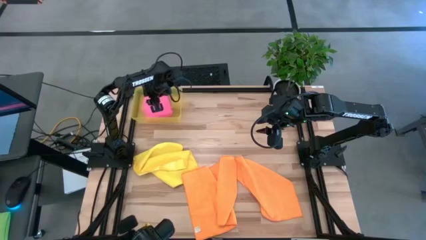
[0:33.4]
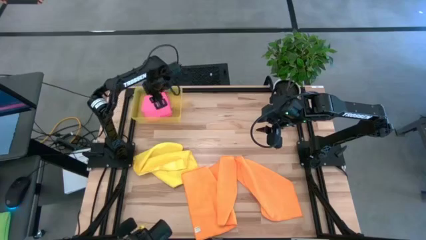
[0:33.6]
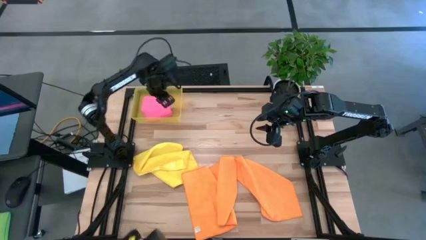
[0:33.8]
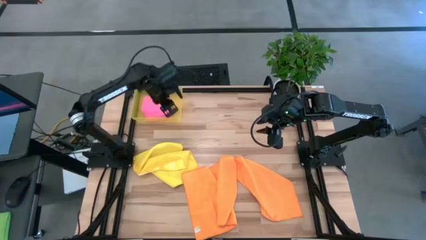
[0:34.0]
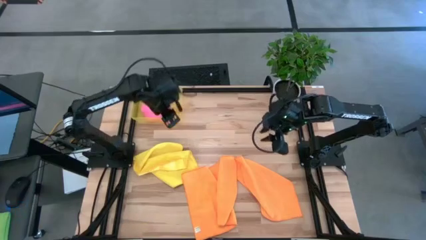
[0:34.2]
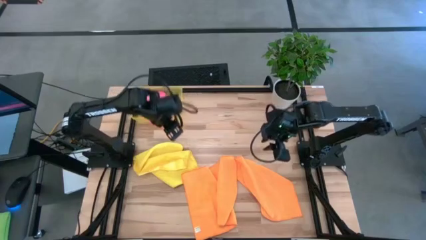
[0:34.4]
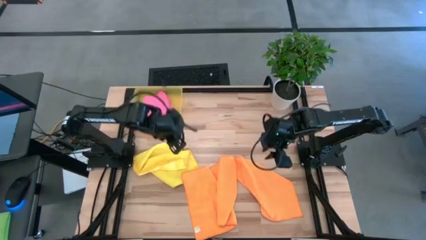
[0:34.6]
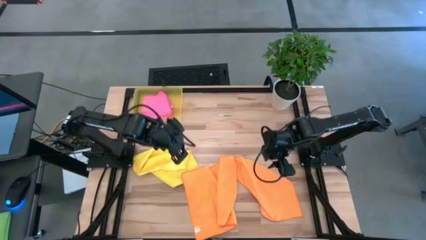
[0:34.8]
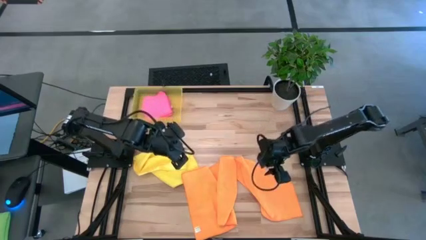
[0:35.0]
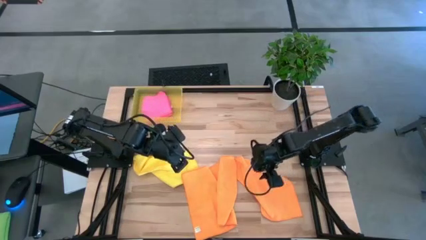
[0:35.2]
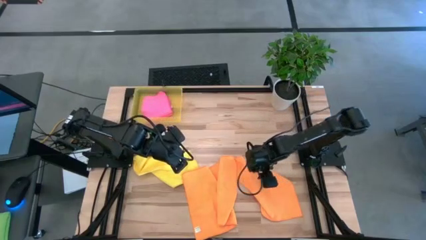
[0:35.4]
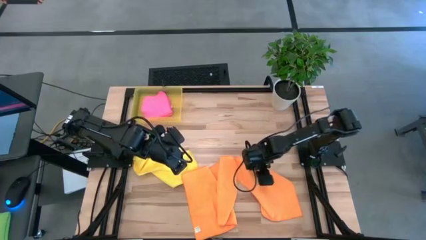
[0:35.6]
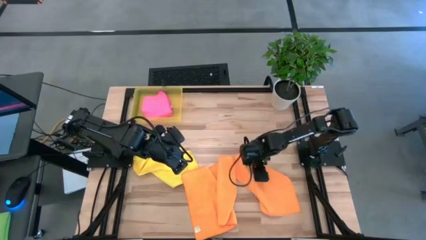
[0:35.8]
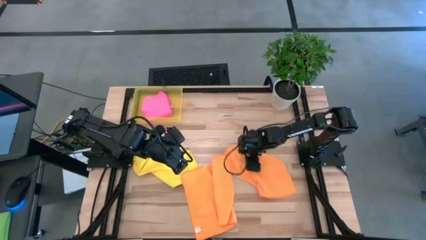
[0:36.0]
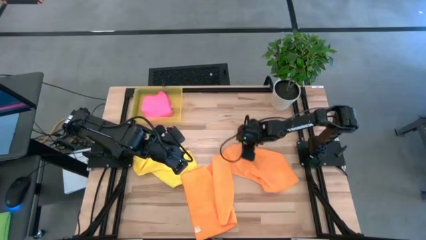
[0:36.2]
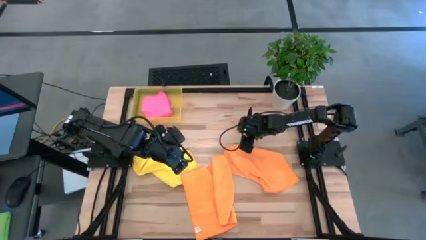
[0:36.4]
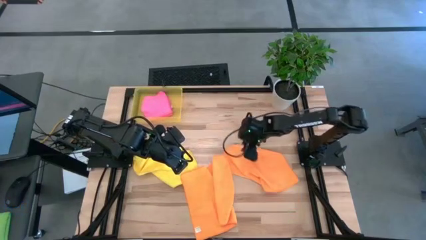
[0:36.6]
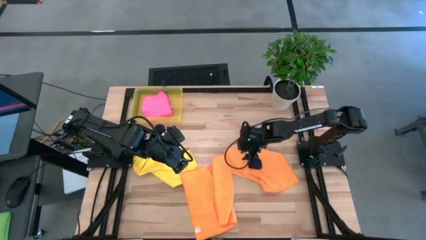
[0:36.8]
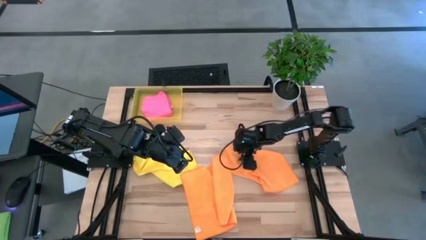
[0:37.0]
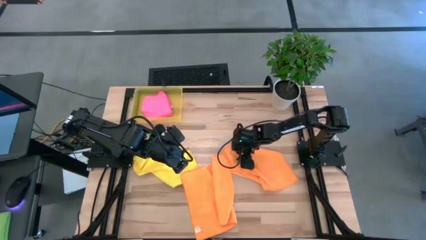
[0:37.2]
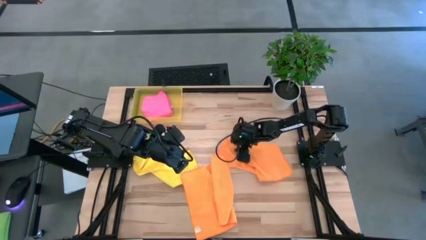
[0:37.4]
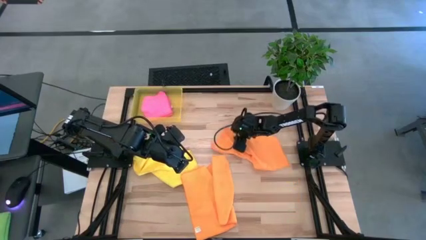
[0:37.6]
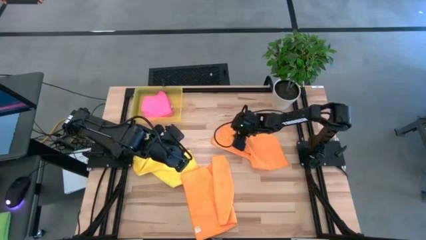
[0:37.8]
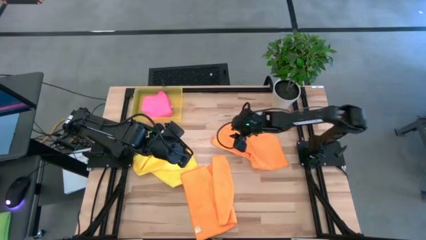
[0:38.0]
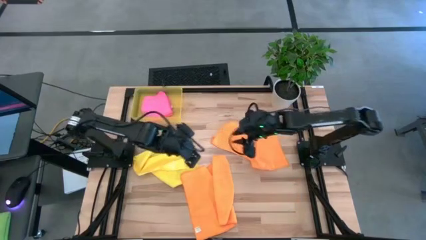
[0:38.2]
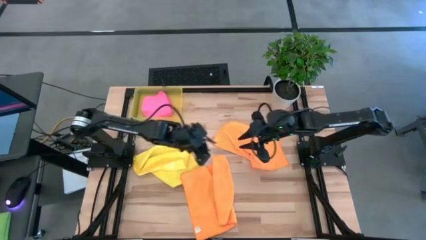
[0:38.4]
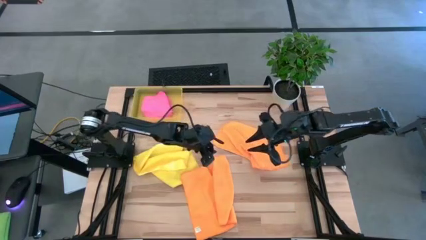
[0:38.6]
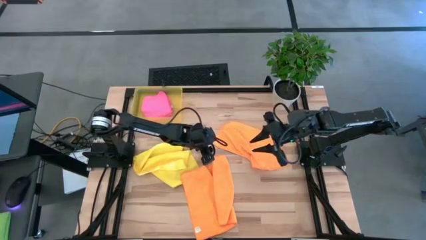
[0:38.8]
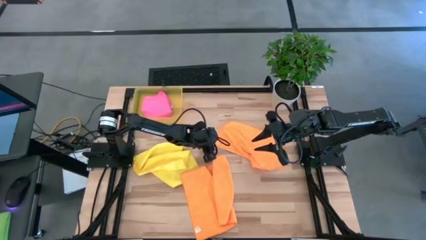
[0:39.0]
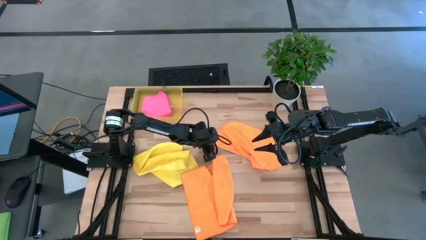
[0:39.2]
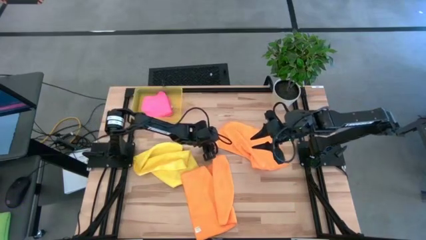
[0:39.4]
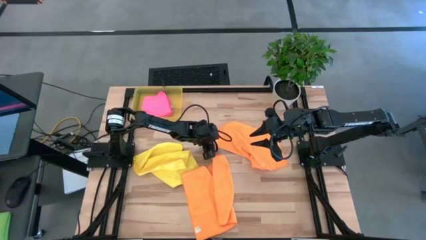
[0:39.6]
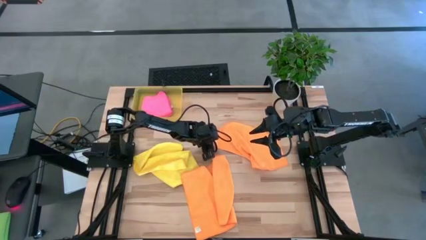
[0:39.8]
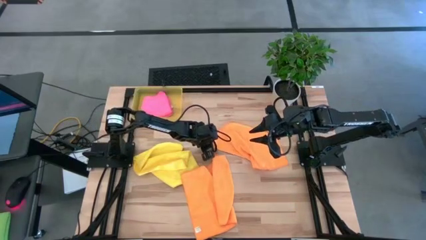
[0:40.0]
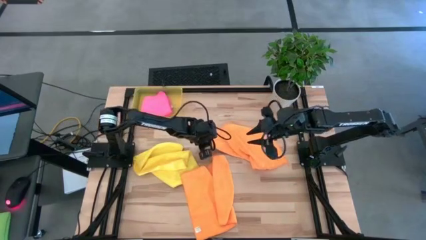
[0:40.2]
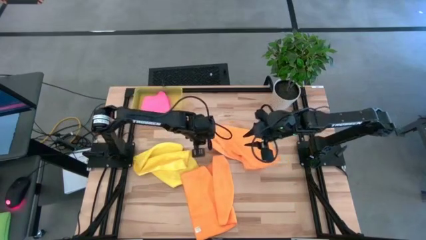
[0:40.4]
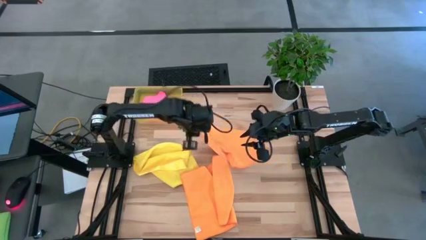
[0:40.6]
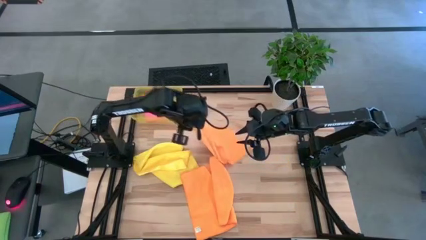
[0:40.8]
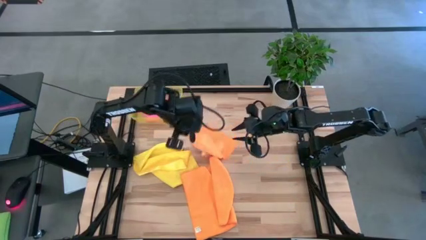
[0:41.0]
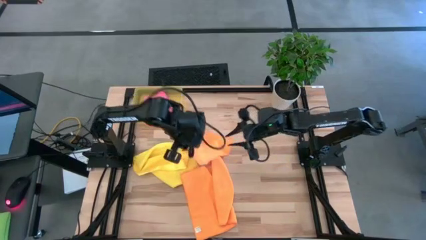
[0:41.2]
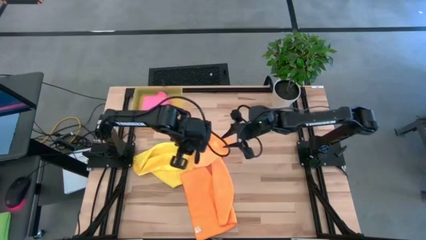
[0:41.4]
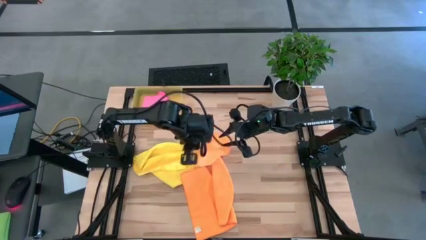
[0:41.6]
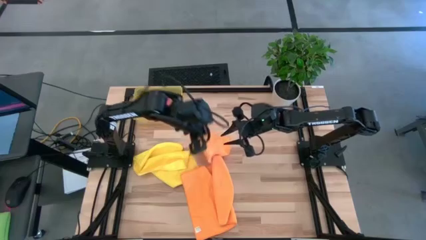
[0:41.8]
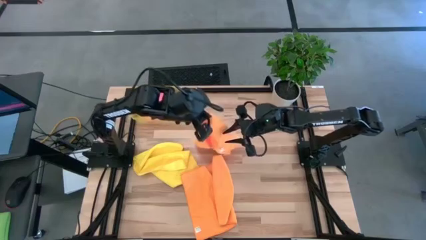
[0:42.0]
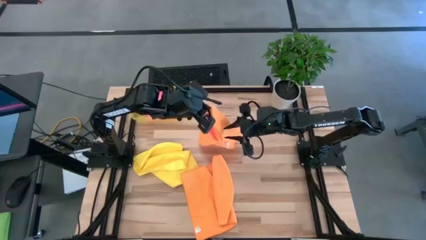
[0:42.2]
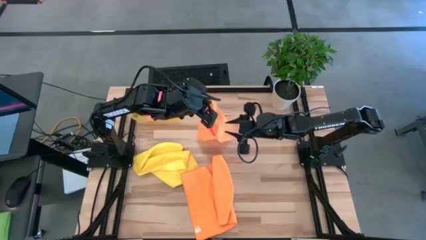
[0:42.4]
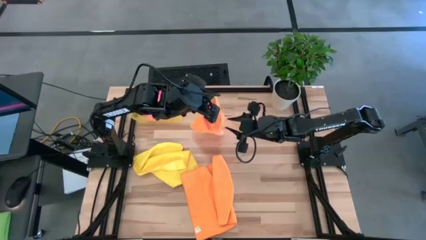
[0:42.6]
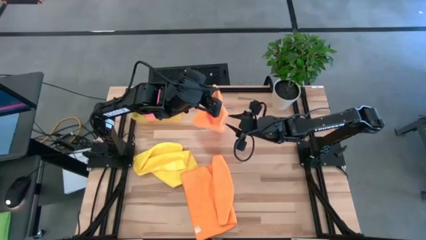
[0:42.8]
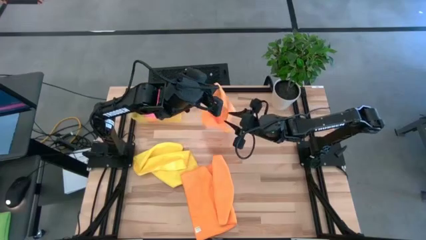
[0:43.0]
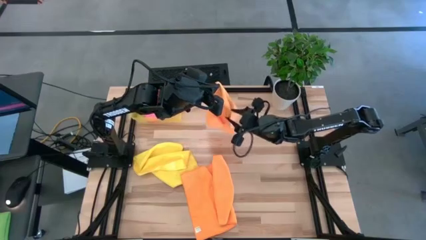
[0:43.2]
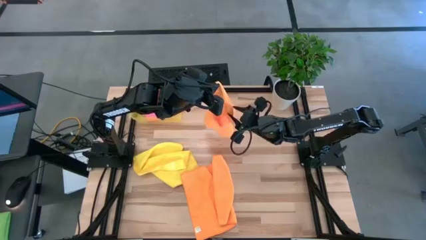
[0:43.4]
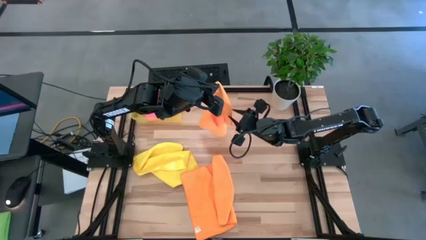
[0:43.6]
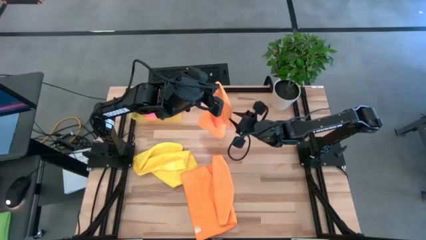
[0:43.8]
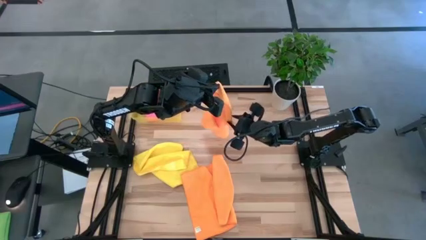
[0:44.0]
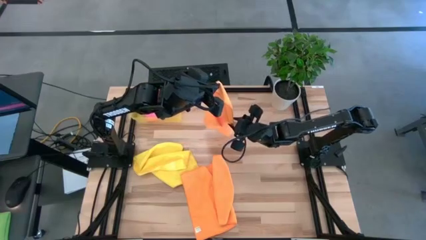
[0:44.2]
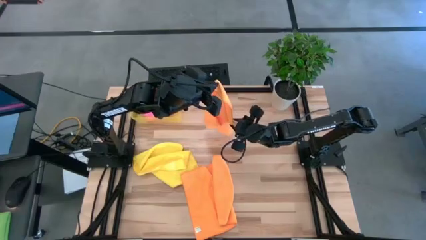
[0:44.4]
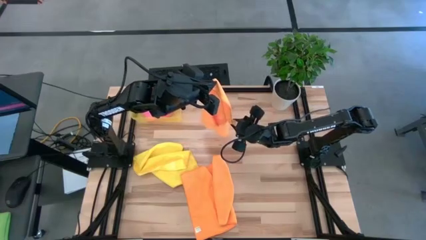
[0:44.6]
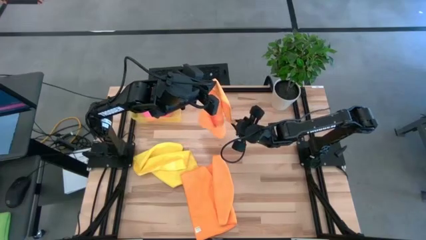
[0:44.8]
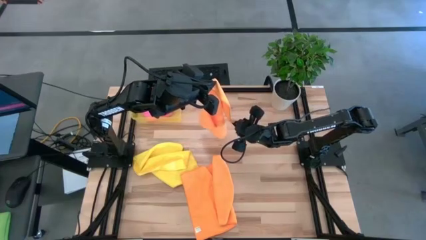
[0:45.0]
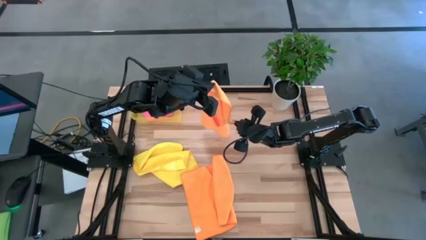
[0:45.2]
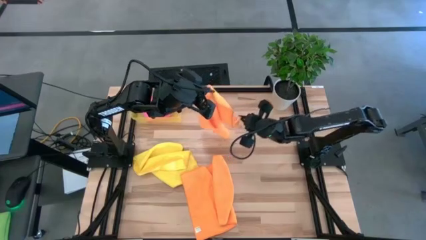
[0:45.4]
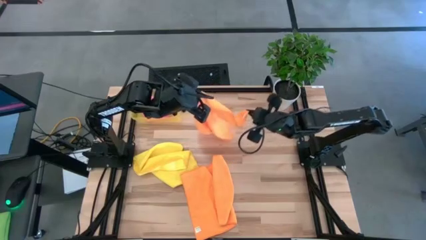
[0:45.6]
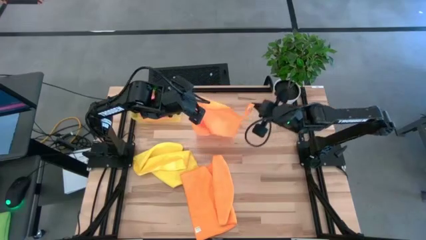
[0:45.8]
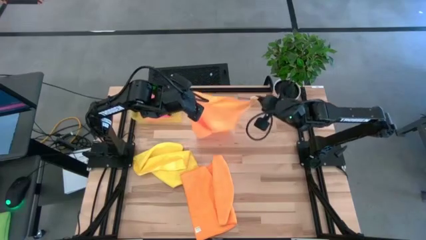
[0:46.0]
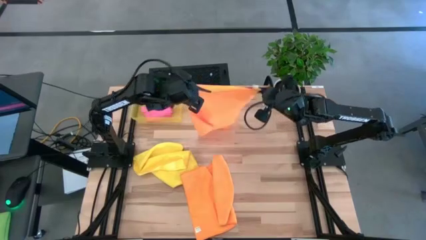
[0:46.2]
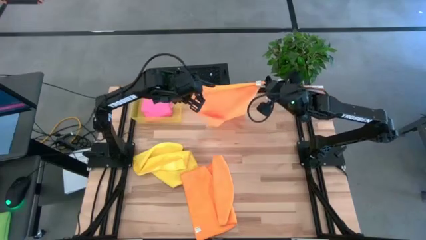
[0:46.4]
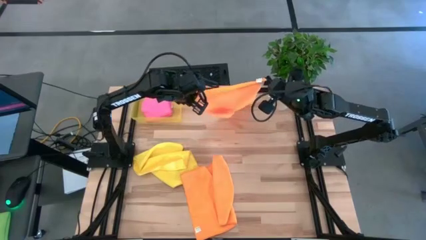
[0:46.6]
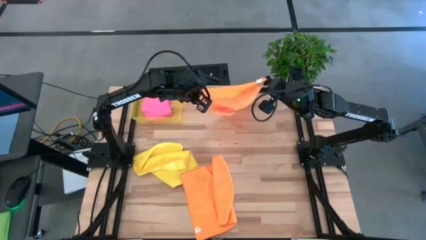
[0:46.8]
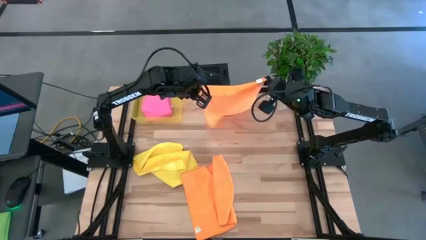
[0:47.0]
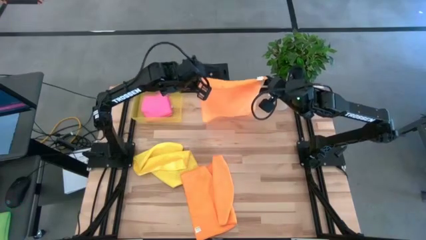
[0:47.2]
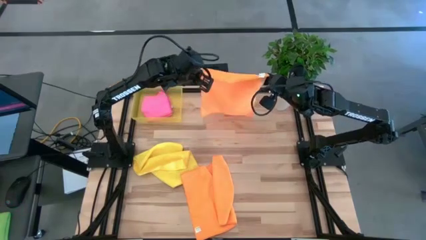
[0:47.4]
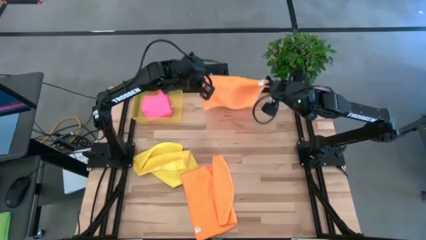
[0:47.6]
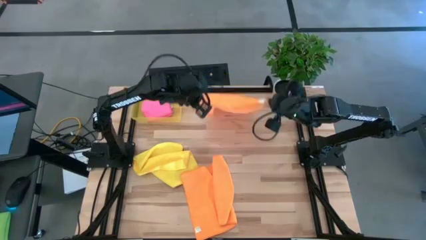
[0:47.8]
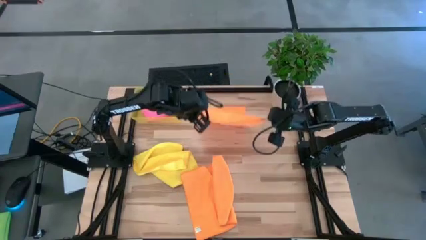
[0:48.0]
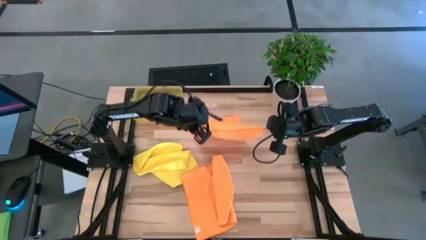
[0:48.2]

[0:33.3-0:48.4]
Task: Fold microfiber towels
Fold the right orange microfiber cloth

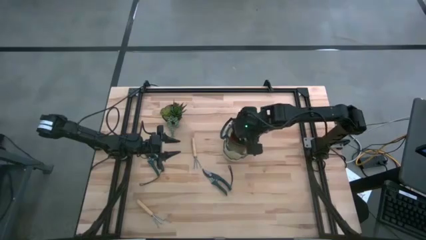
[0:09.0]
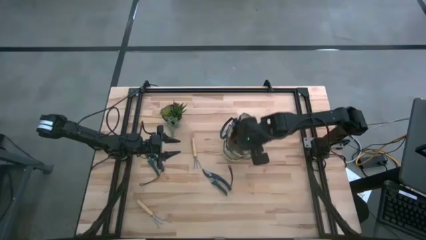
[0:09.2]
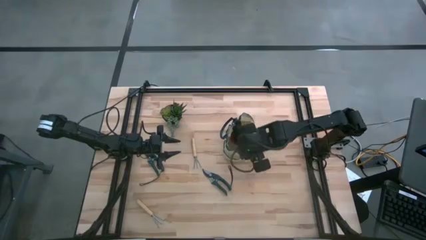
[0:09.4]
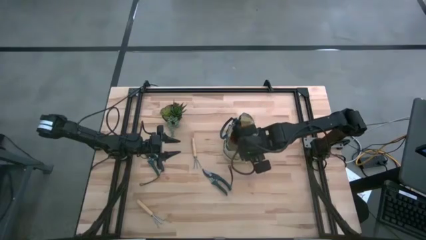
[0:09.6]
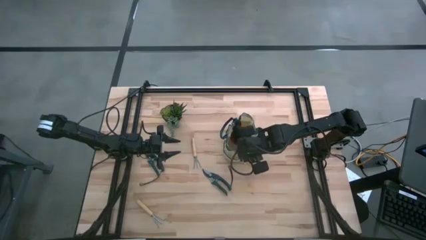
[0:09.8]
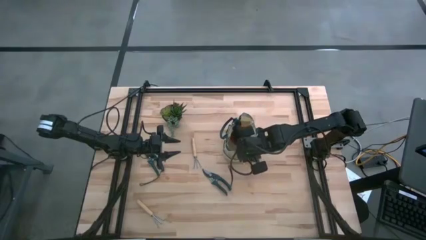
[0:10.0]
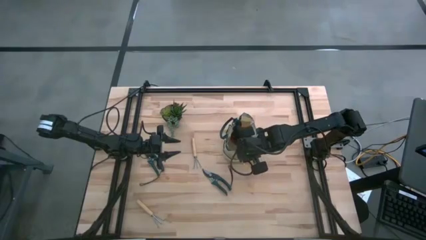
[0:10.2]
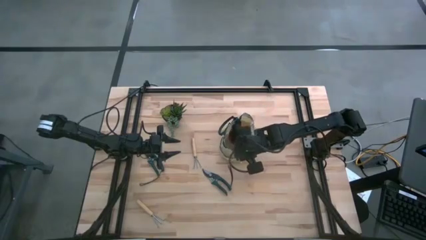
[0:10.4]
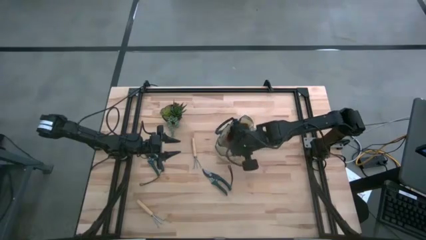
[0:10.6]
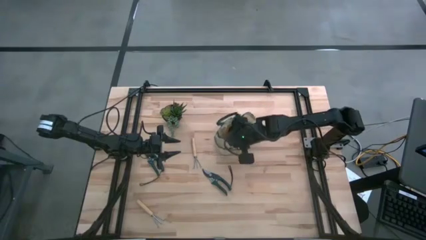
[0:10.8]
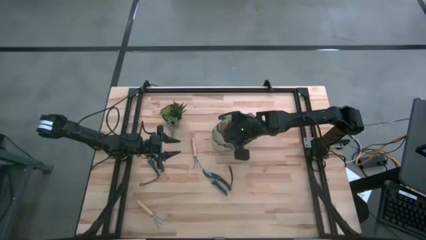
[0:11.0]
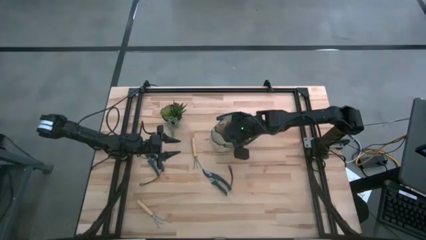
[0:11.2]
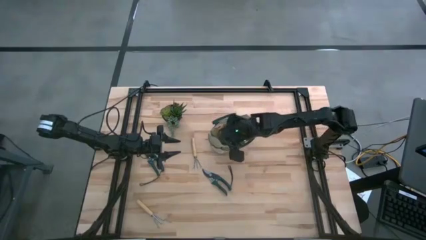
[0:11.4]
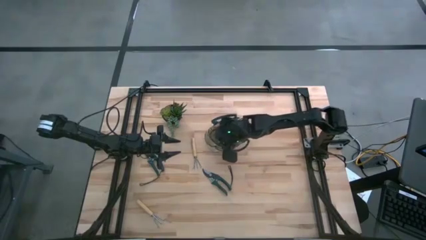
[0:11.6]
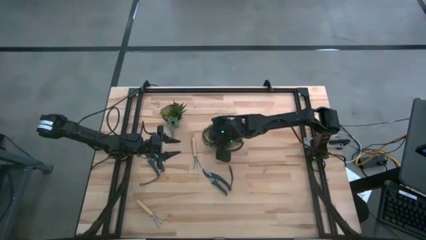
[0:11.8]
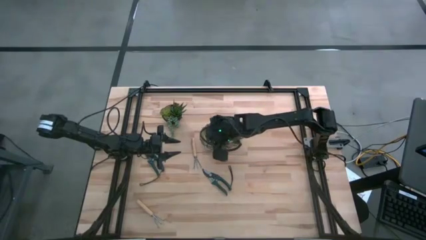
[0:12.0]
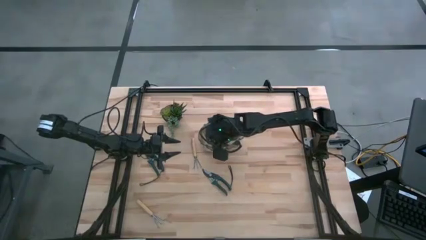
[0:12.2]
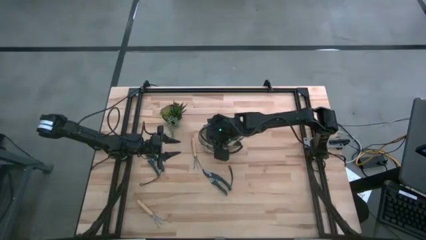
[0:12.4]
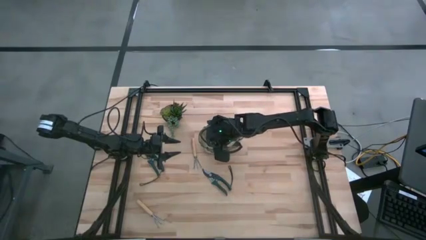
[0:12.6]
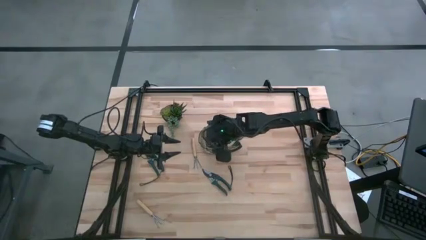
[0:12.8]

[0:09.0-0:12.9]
Task: Pick & Place Garden tools in Gardening bag
Adjust the white gardening bag
